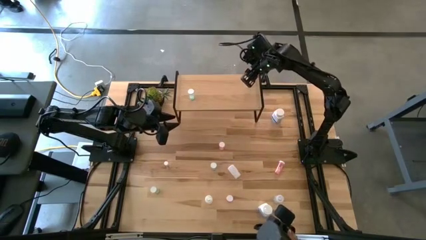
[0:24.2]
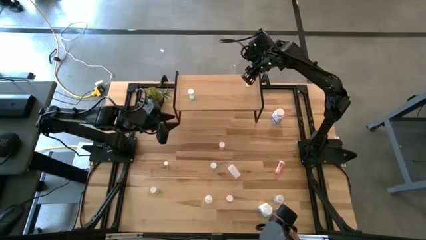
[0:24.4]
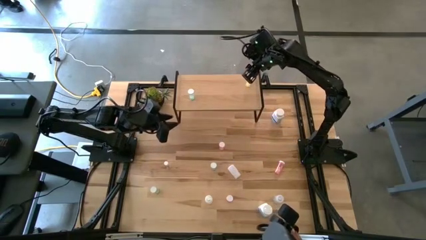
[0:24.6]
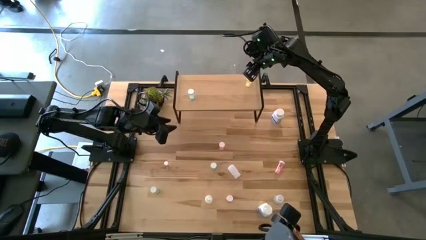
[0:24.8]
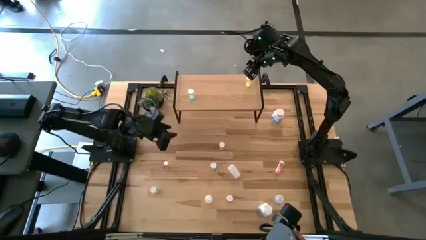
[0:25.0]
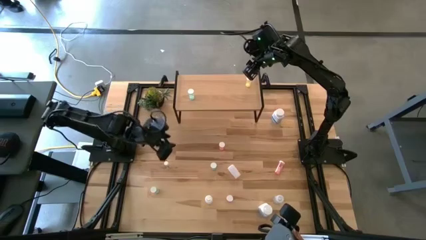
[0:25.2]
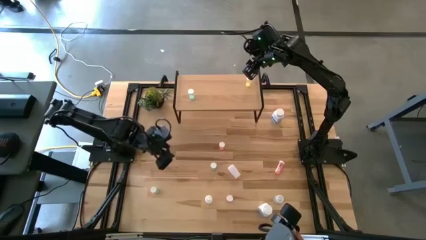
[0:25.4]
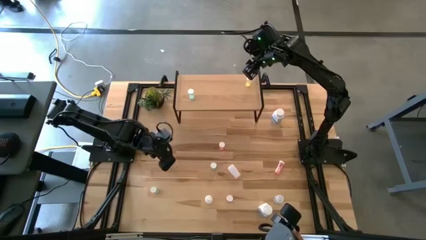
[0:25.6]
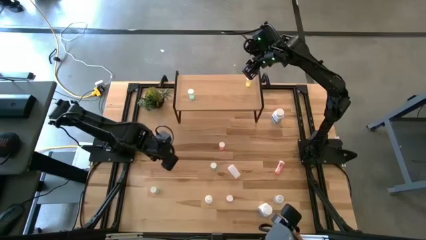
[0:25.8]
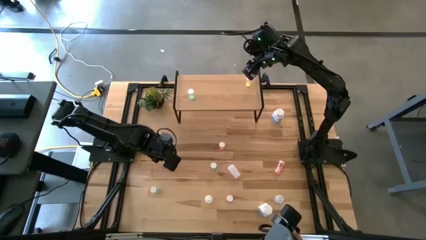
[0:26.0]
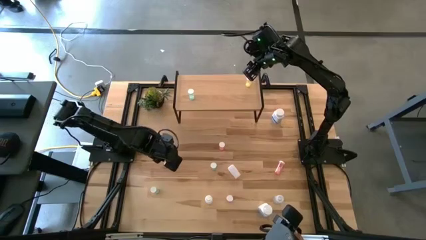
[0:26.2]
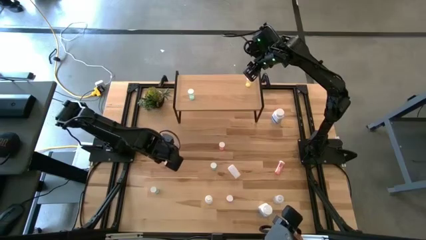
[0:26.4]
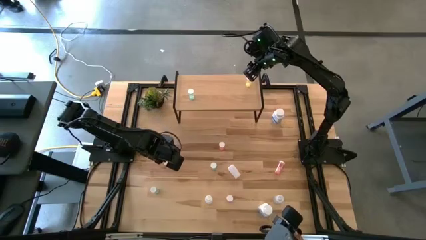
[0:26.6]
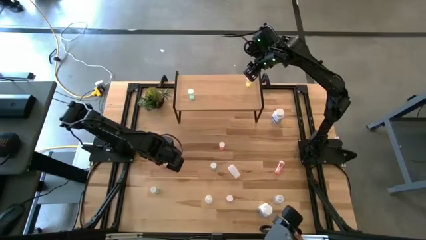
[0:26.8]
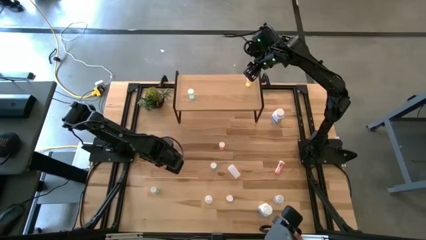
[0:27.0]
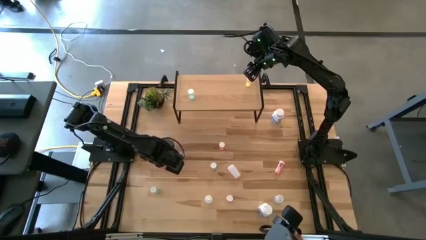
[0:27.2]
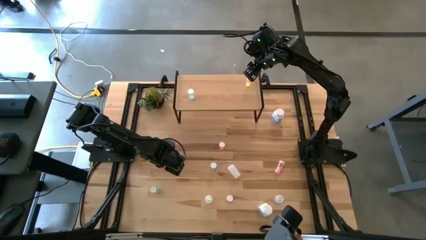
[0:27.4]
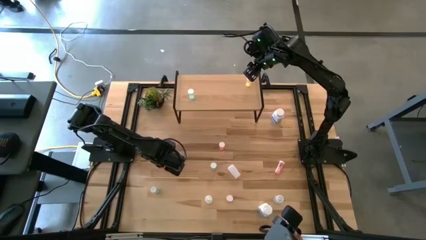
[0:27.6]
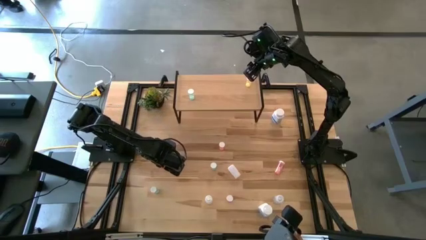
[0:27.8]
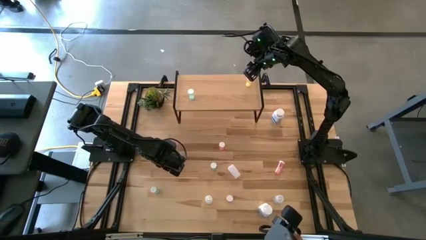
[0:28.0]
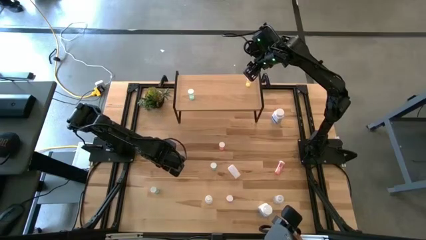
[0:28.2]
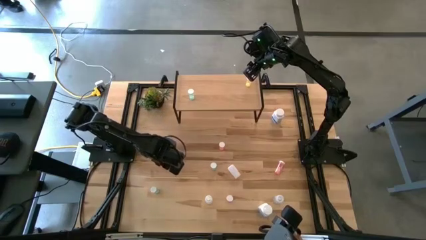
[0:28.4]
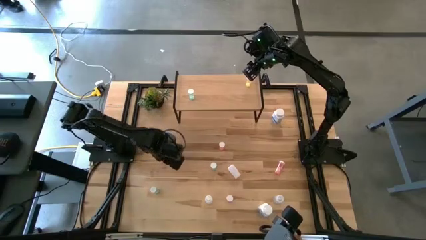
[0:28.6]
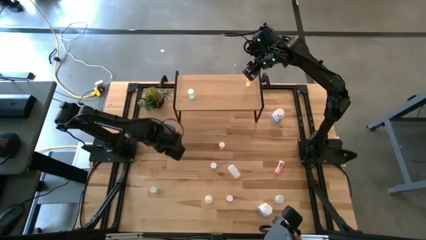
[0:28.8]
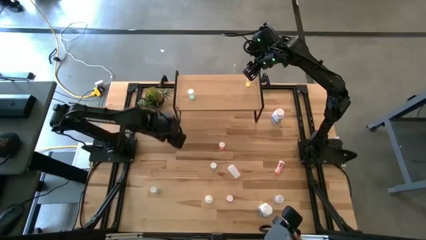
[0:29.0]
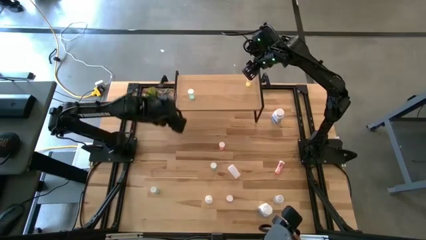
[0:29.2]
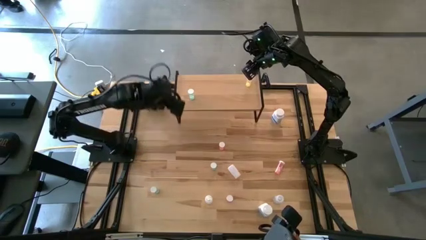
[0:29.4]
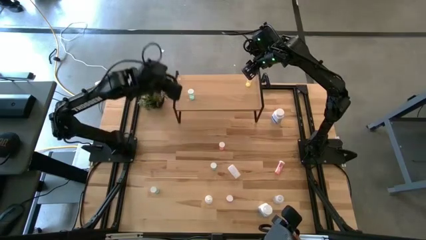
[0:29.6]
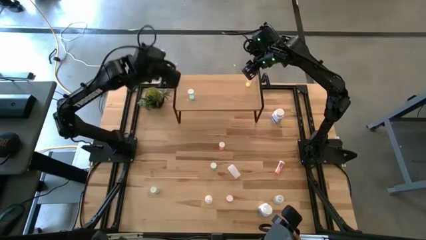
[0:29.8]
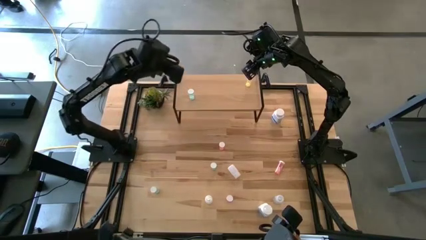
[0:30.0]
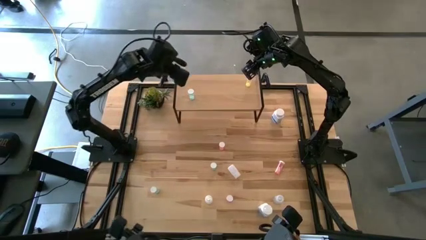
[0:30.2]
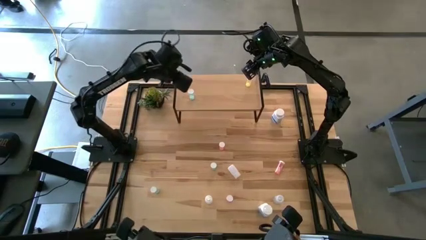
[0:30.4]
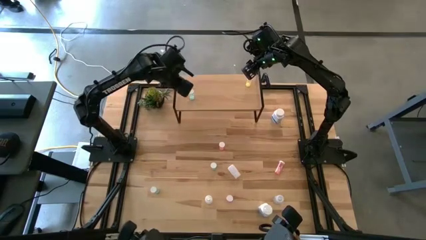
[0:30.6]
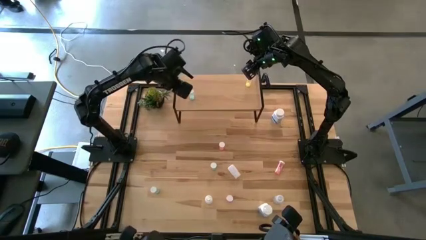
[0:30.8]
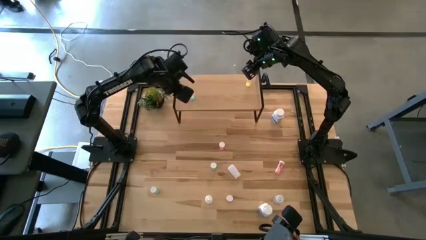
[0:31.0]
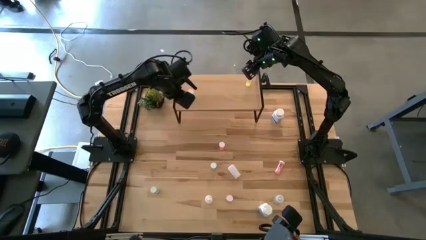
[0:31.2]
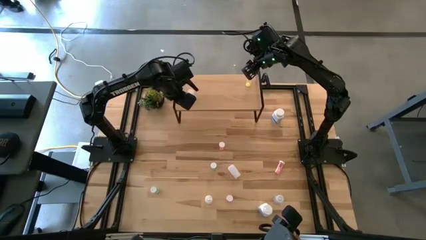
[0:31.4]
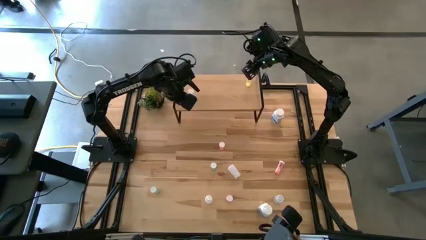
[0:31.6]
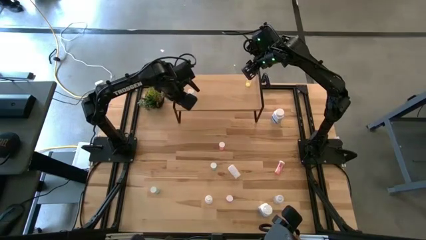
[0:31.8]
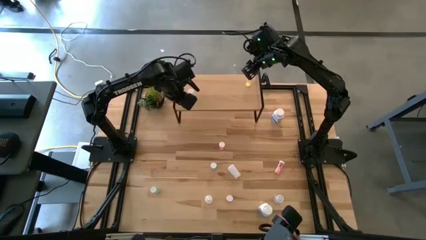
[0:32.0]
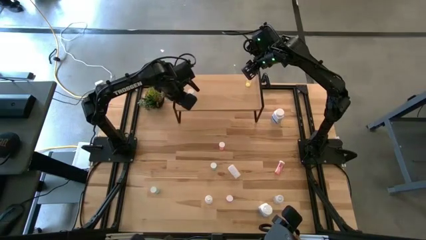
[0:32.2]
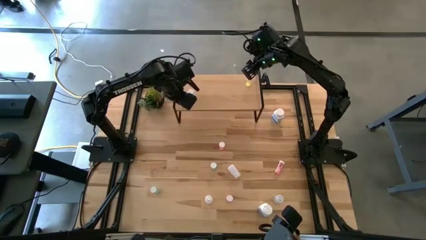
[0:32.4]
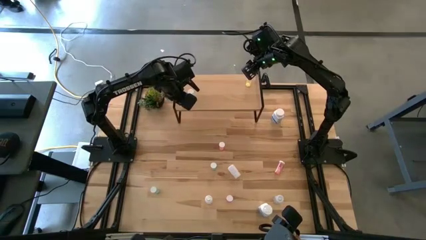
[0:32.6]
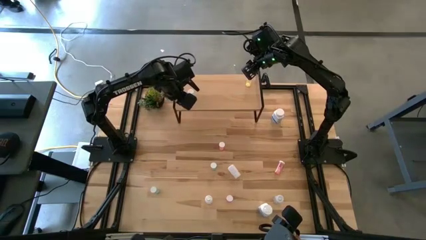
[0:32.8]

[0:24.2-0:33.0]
Task: Pick and place medicine bottles onto shelf by color
Put the white yellow pill bottle on the shelf

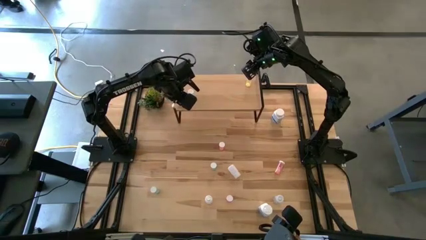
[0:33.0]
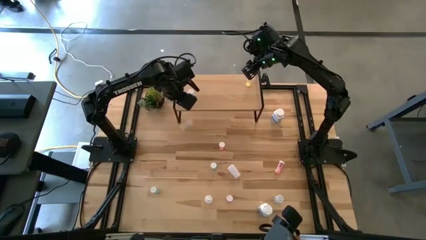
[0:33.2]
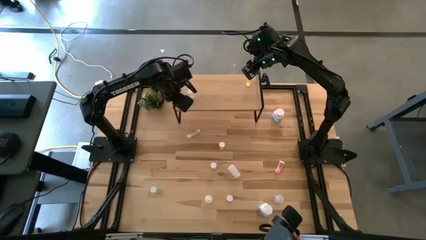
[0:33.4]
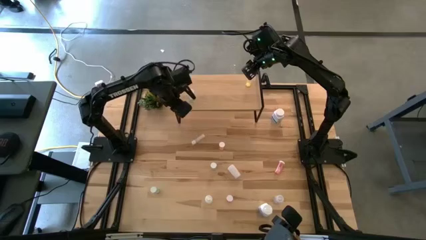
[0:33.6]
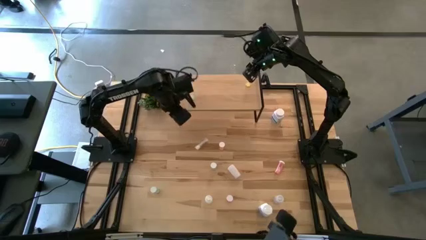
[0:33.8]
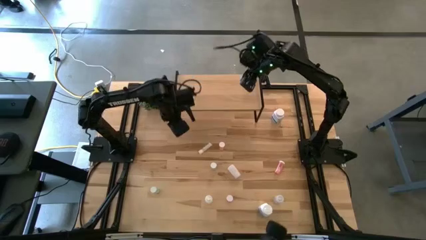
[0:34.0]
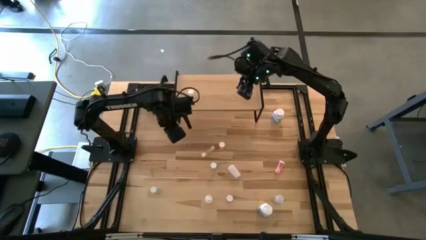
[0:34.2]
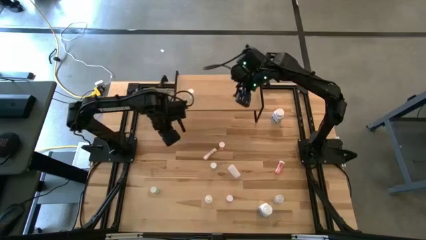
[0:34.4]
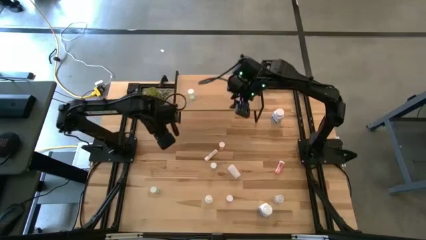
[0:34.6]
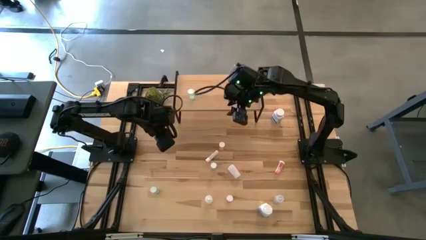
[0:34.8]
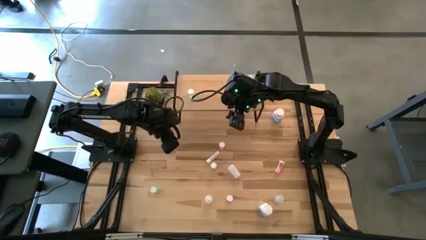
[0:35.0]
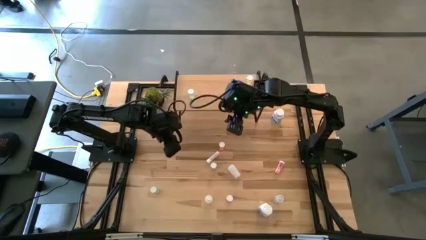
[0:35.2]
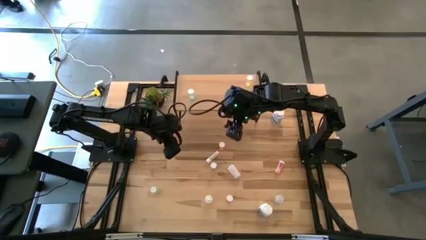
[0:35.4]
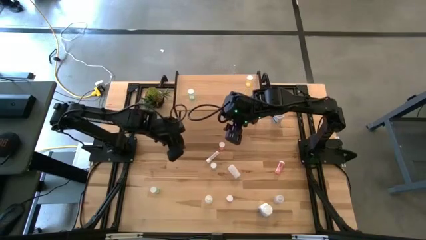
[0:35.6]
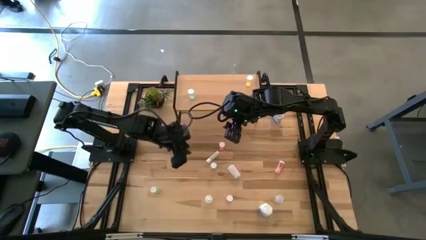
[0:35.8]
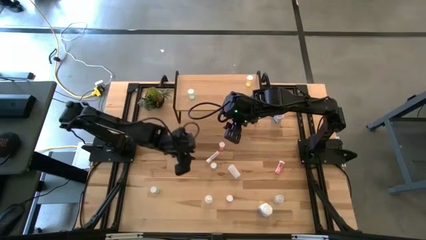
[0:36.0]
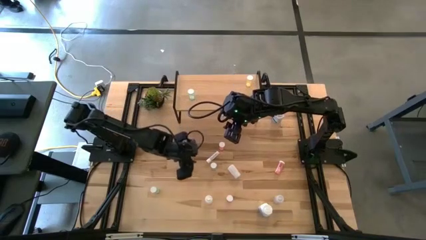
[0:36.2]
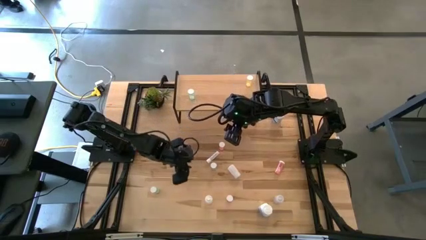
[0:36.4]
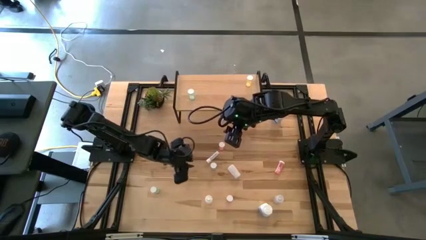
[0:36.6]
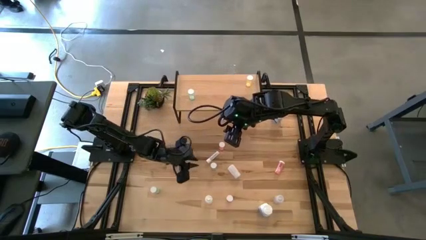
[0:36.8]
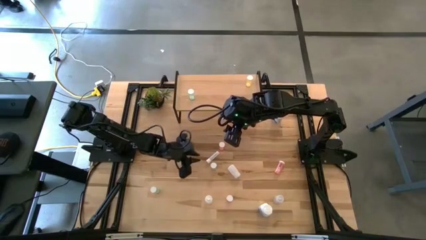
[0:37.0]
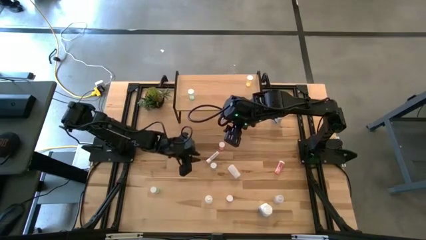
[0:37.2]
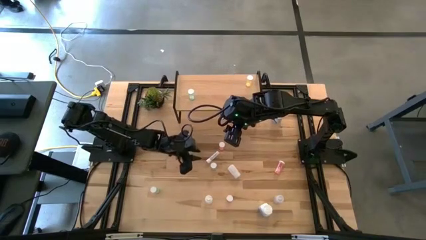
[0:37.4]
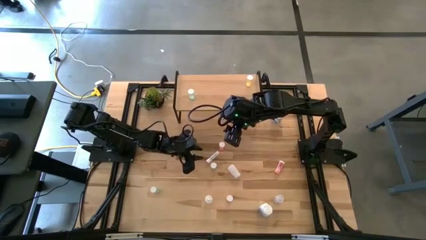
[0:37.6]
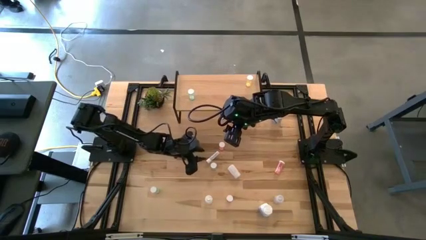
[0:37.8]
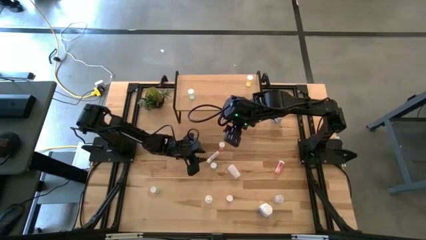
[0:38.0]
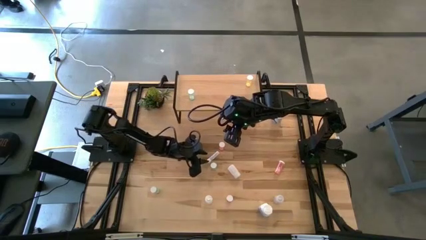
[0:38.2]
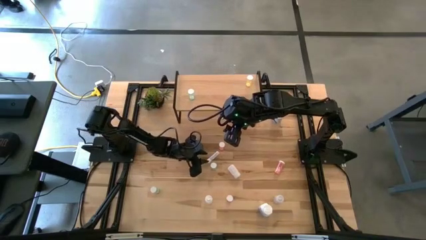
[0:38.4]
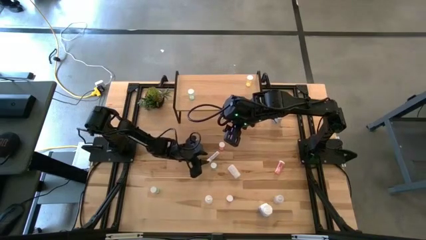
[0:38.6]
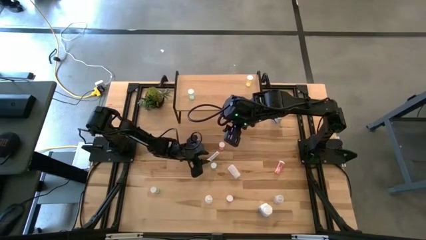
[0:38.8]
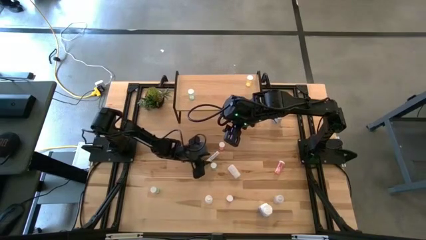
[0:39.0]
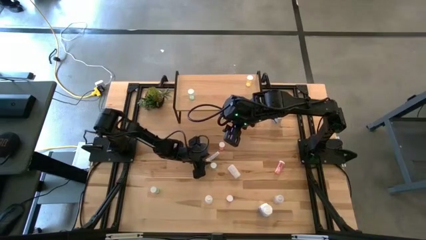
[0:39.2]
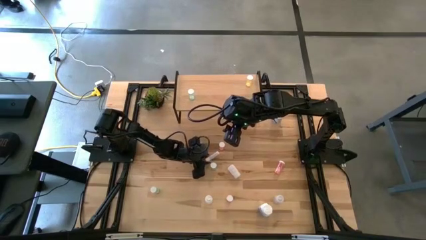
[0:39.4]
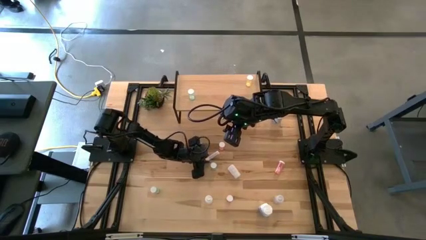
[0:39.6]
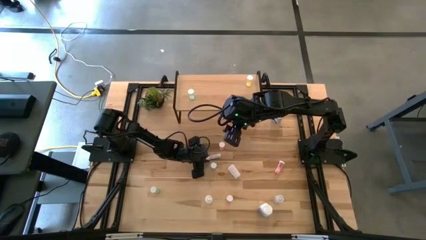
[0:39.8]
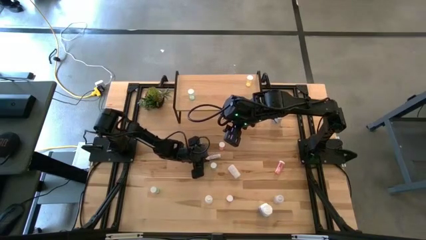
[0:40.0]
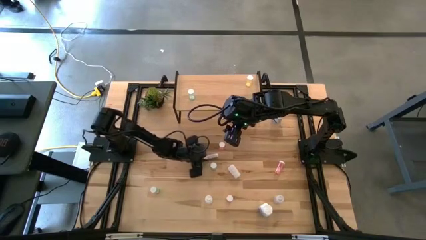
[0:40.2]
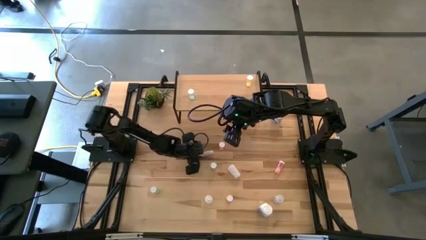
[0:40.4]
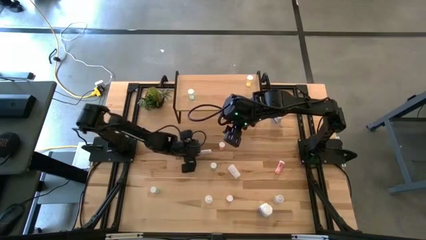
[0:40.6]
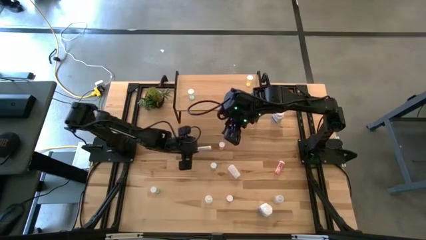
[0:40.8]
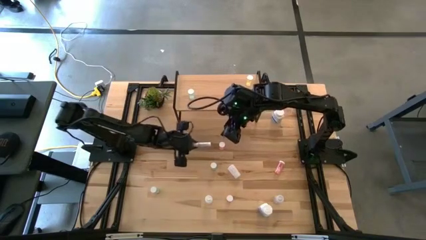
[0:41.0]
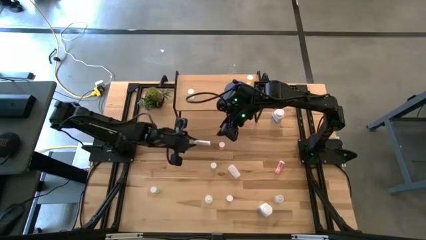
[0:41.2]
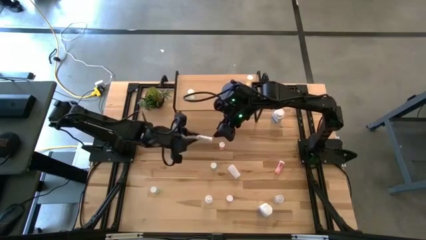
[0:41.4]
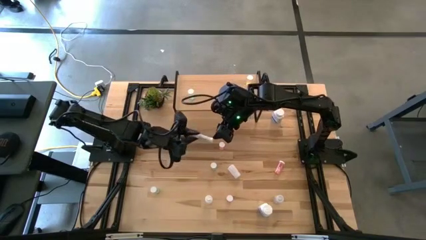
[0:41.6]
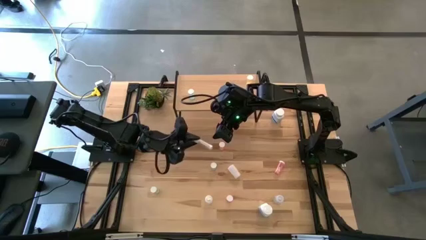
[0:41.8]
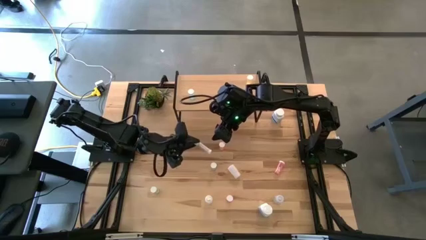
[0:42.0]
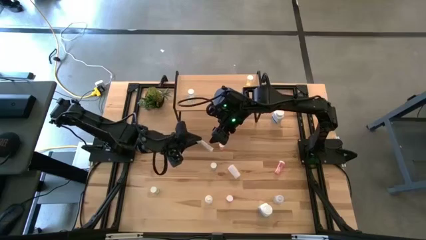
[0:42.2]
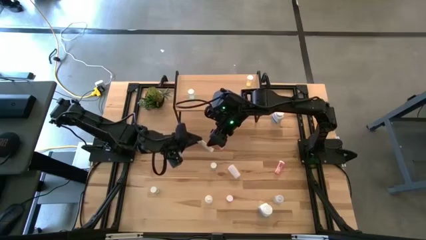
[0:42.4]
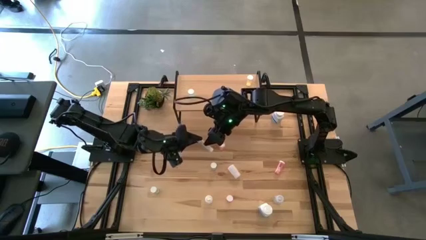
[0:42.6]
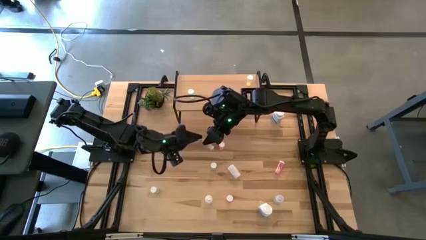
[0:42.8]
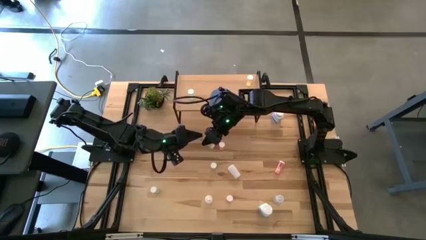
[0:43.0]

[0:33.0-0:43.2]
Put the white yellow pill bottle on the shelf
